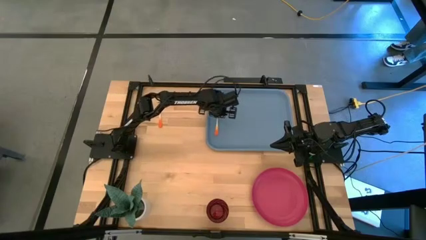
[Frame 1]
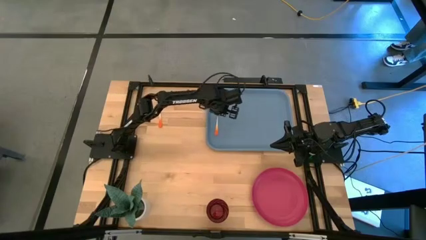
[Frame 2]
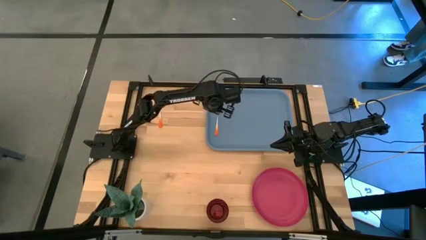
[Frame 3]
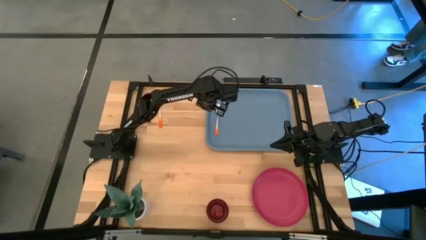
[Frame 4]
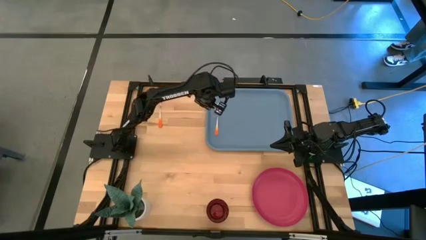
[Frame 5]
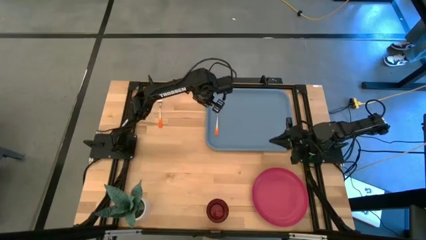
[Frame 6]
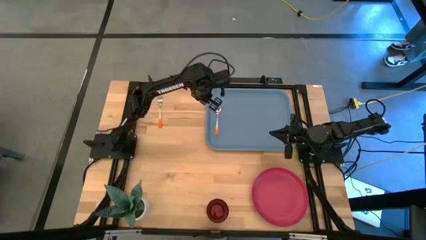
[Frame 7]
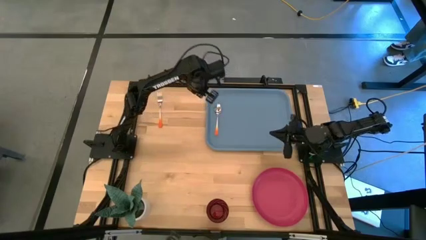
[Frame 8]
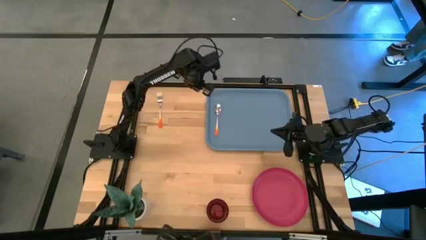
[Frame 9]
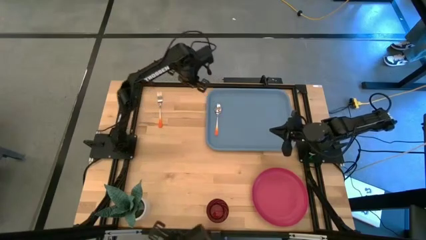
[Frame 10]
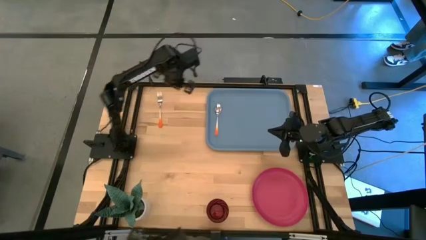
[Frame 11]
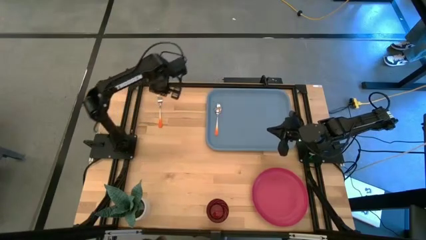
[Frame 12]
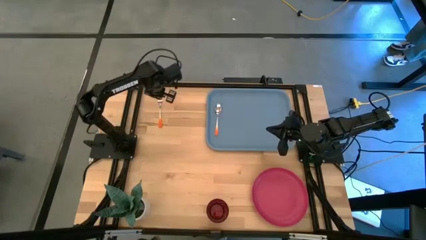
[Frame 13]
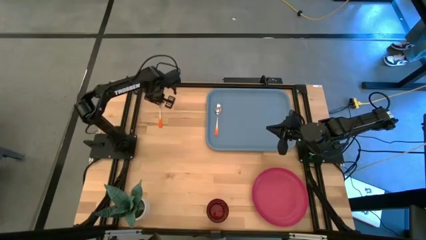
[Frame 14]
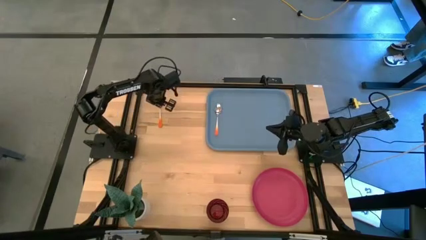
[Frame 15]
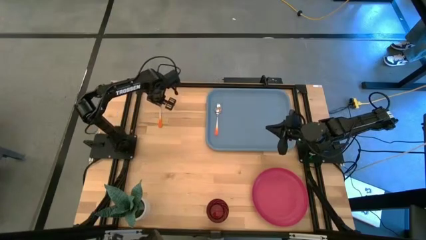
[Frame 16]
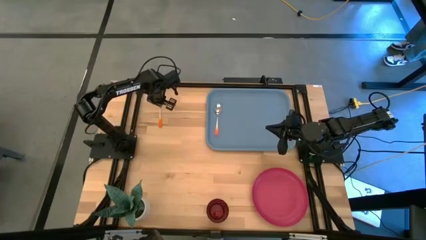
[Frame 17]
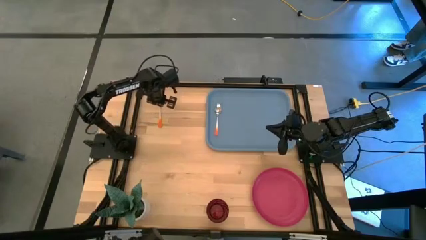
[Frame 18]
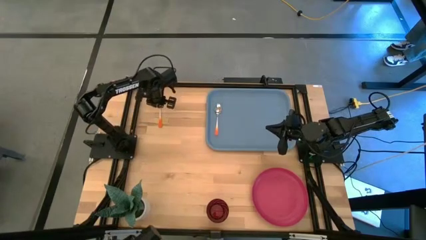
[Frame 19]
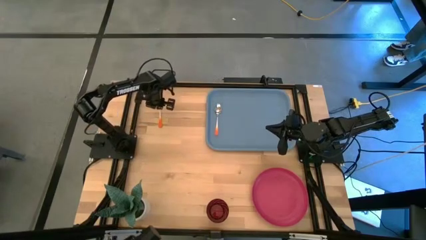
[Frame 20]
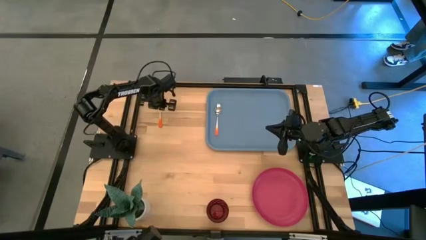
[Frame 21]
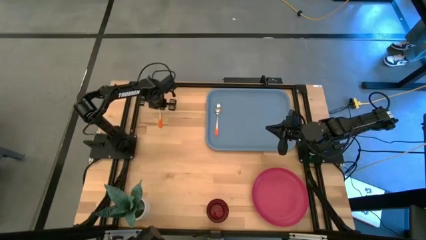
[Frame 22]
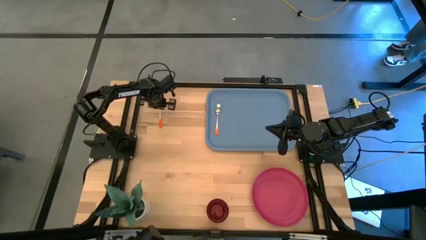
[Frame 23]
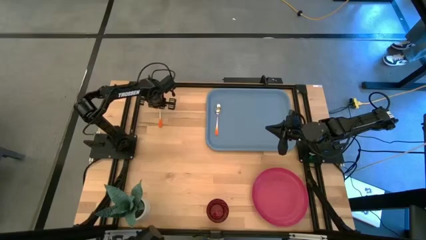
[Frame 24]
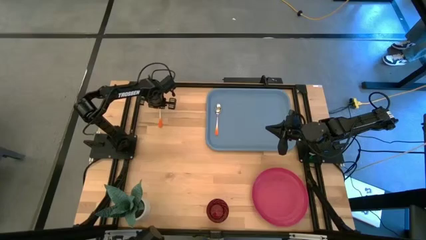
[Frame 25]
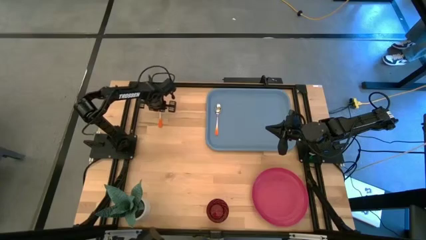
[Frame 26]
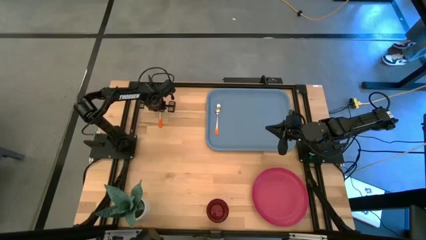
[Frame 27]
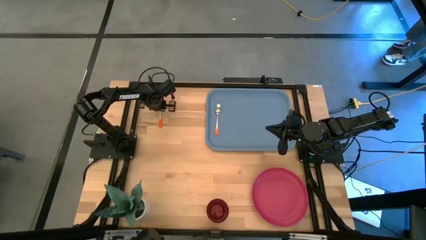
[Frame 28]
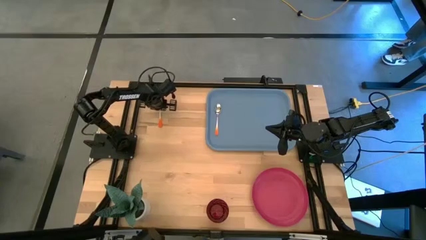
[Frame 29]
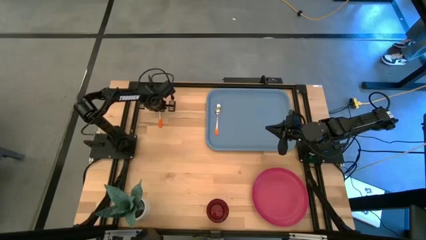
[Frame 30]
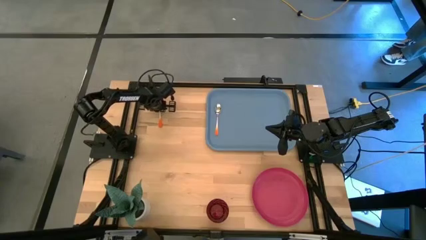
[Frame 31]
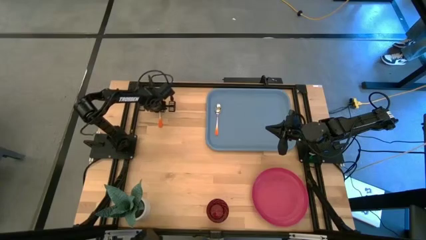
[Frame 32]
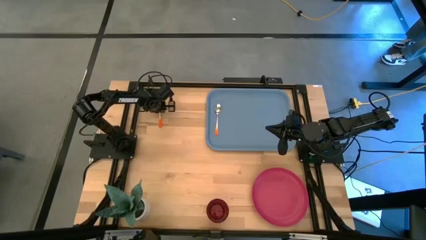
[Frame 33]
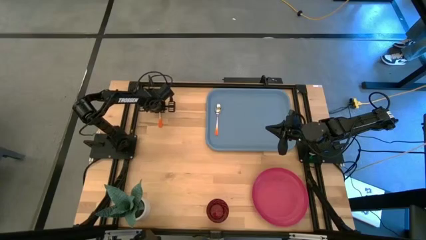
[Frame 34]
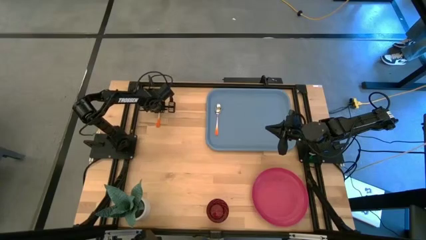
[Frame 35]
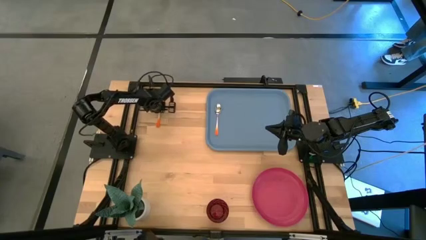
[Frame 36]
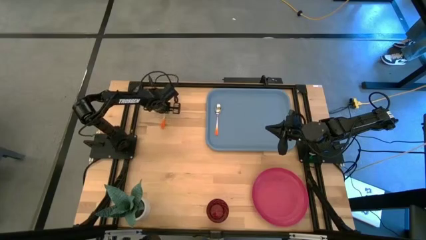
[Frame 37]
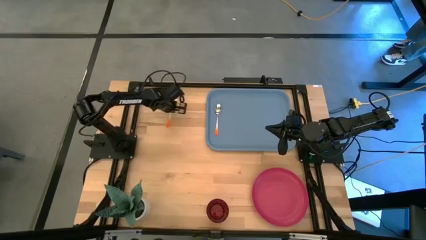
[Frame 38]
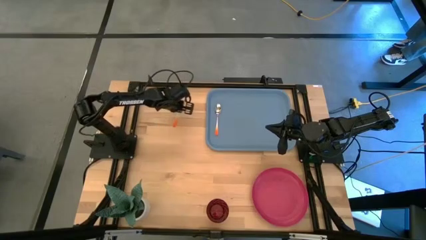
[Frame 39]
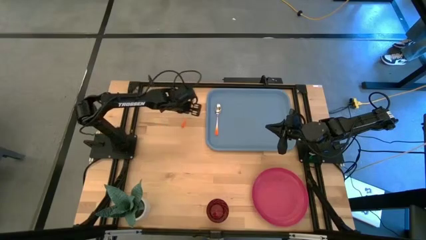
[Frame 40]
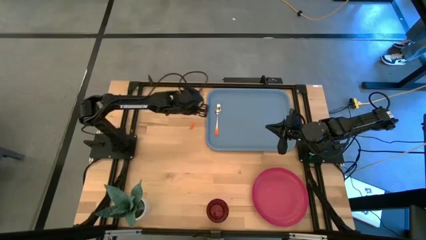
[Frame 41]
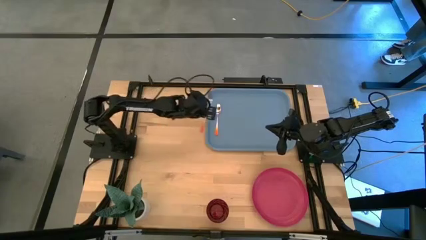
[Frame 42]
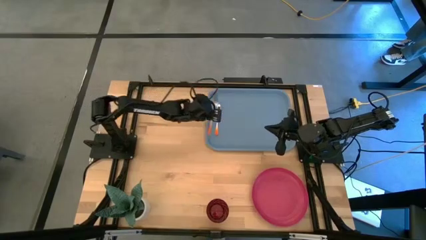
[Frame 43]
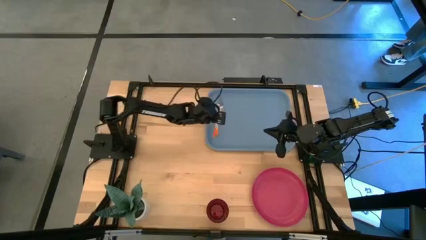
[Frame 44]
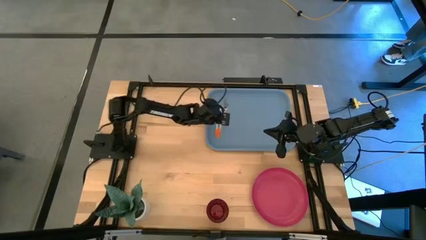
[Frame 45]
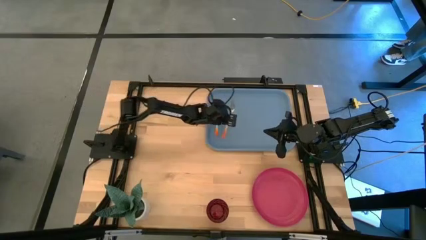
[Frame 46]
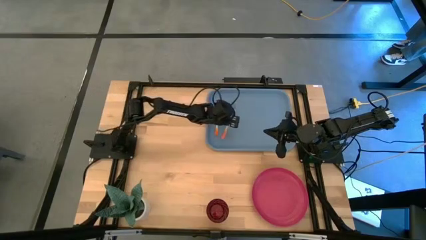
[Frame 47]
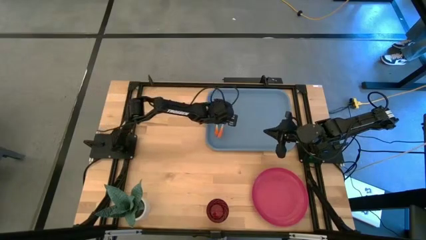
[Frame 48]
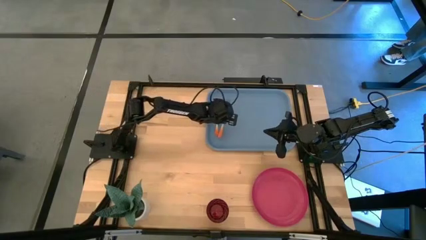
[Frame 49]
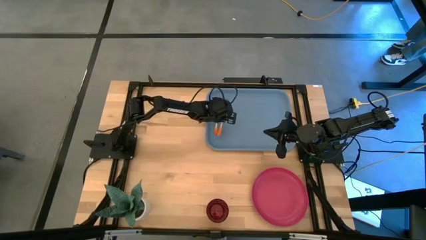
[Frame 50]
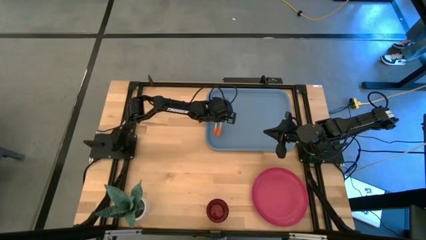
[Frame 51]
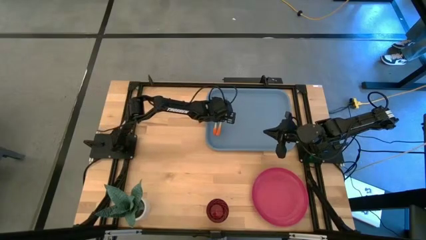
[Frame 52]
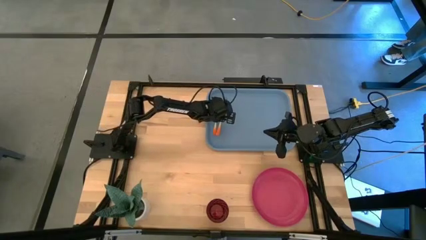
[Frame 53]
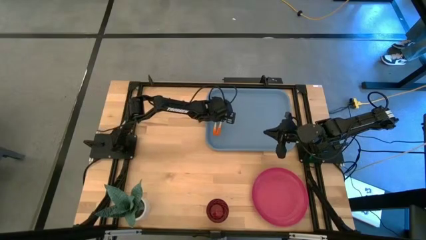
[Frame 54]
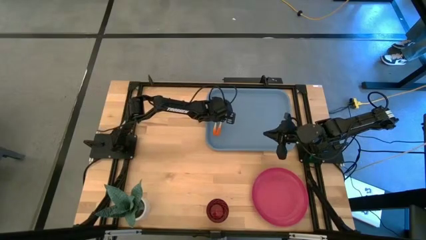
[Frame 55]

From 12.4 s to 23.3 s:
Task: Pick and place plate/cup/fork/spoon on tray
Put the orange fork to the right side of the orange spoon on the blue tray

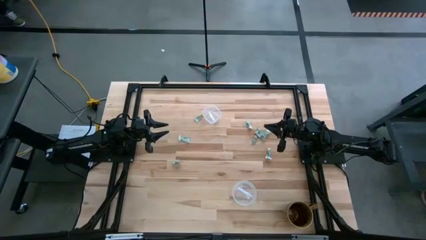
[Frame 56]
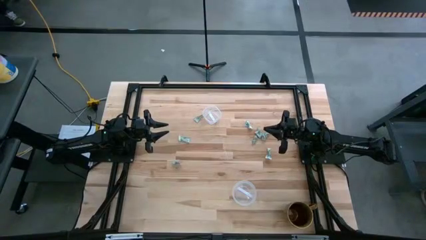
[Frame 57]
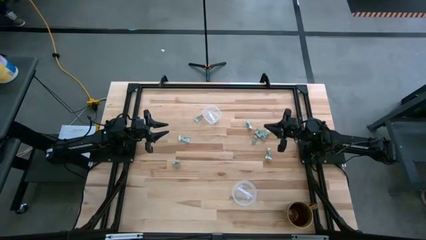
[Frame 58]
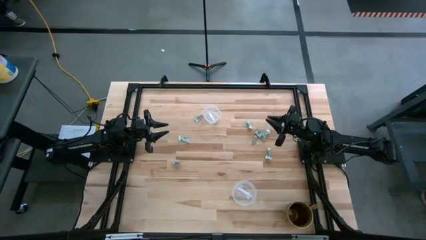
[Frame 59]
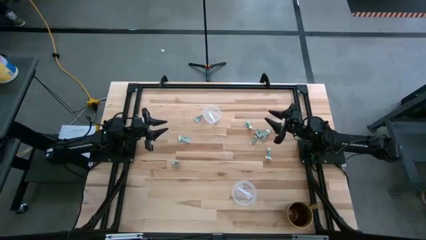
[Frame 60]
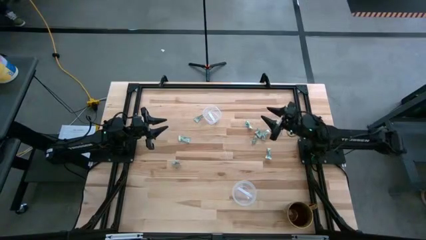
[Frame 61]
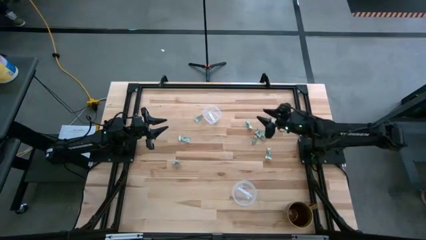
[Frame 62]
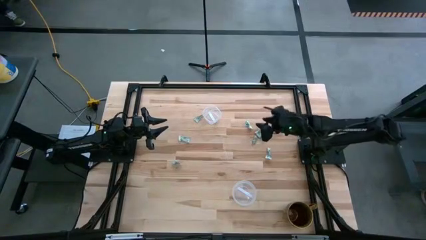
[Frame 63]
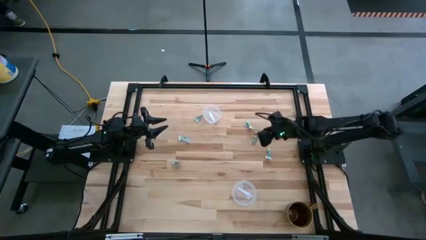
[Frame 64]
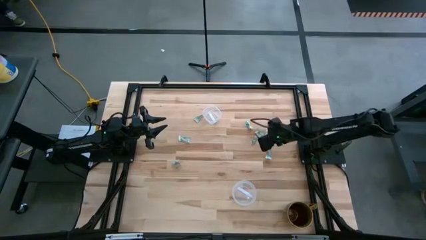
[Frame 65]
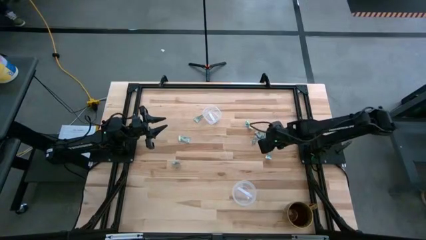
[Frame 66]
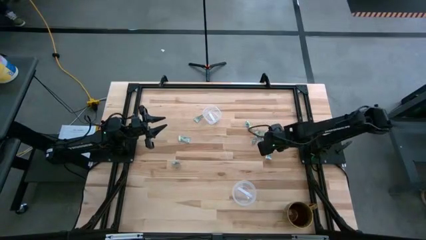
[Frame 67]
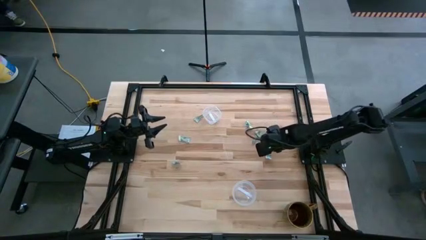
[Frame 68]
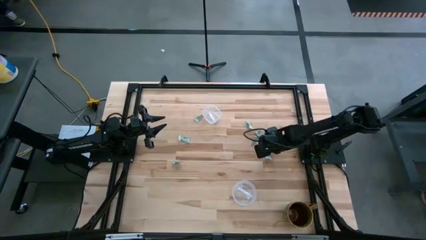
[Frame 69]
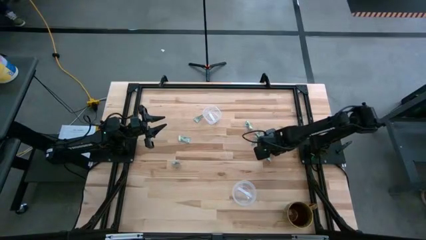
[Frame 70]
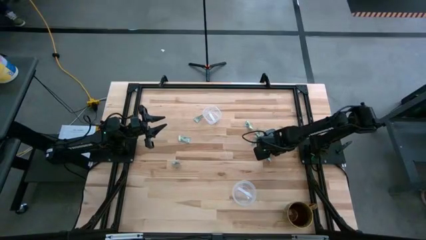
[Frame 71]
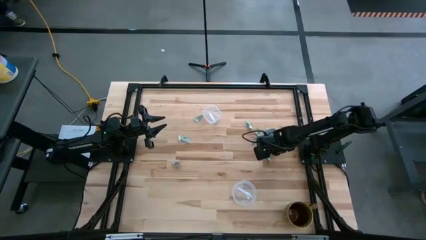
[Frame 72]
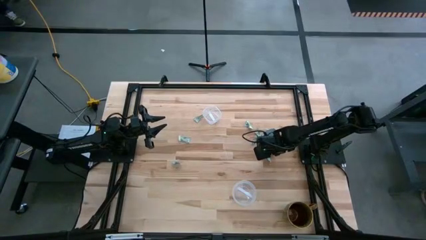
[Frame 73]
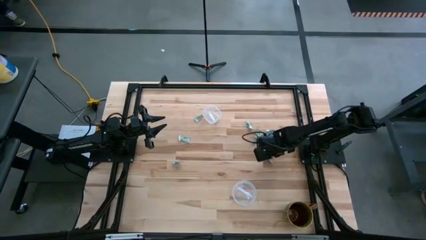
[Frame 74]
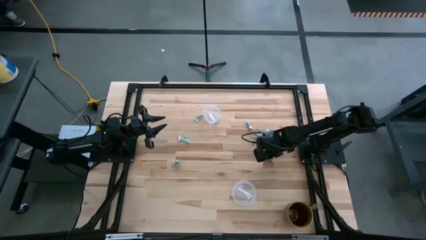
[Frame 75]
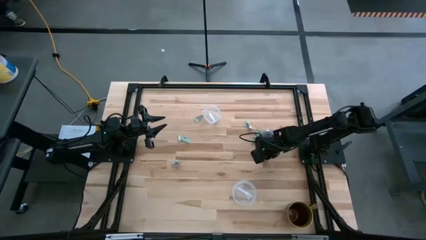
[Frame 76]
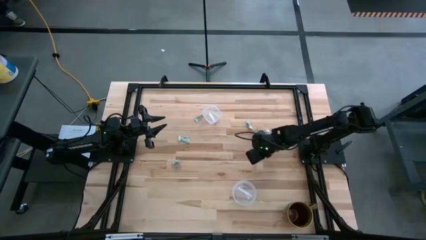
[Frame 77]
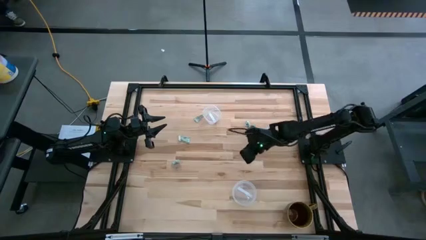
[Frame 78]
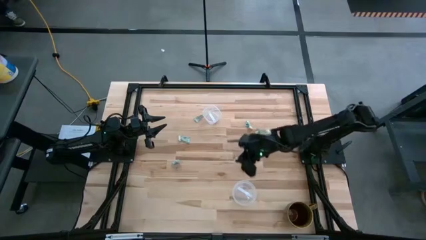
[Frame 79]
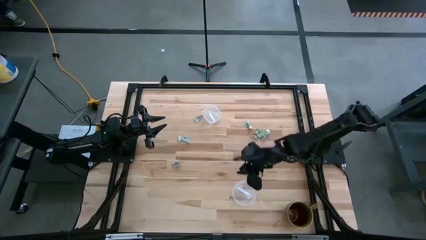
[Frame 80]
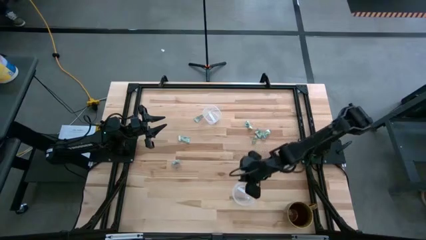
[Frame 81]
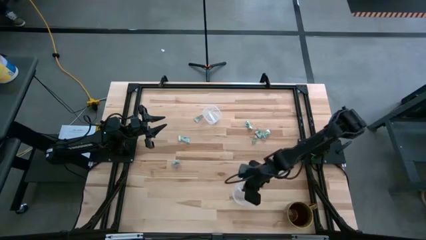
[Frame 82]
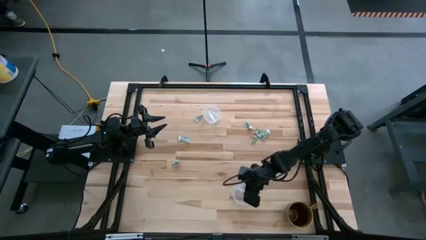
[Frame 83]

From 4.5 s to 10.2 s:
Task: Pick and place Stevia / Truvia into bins
Put the stevia packet into the bottom transparent container
